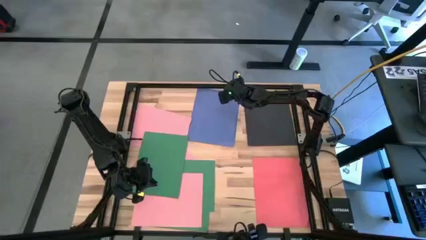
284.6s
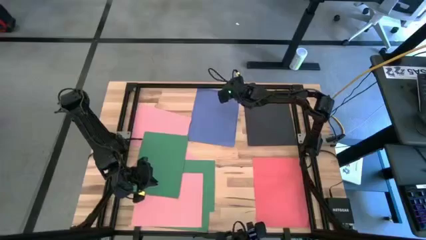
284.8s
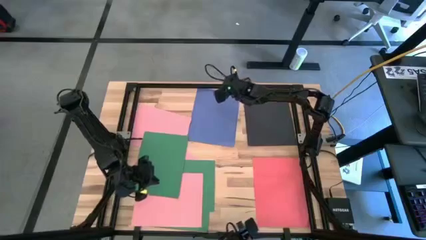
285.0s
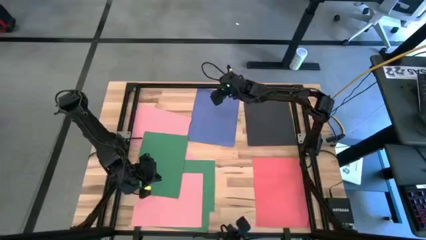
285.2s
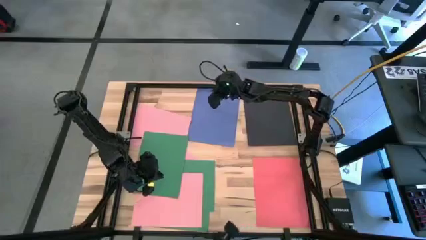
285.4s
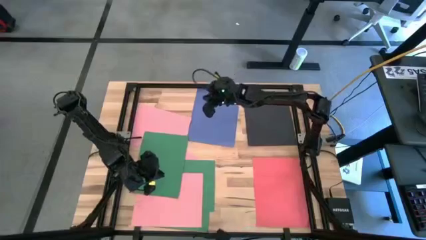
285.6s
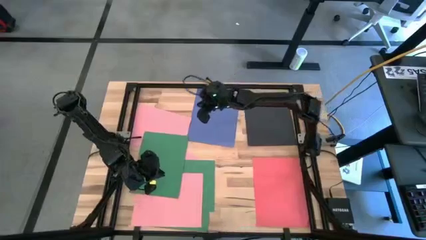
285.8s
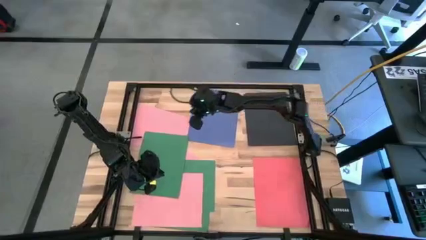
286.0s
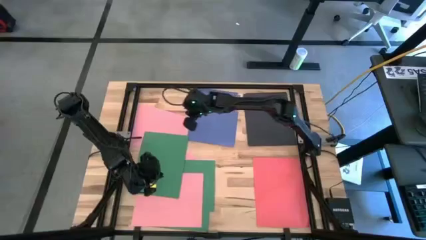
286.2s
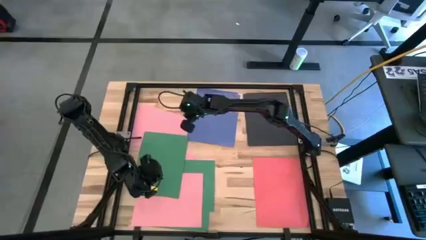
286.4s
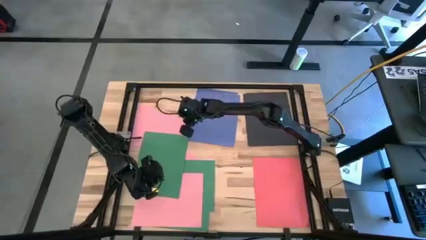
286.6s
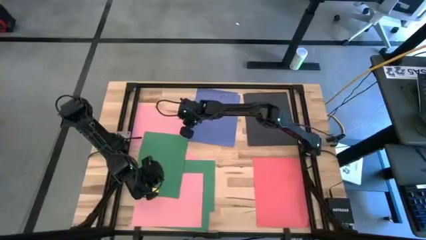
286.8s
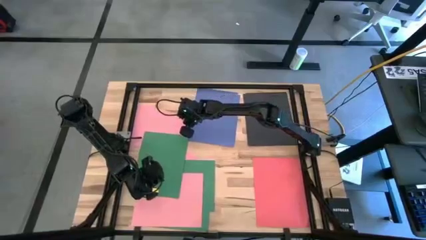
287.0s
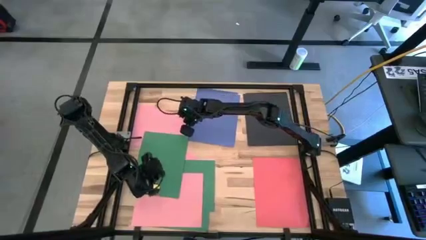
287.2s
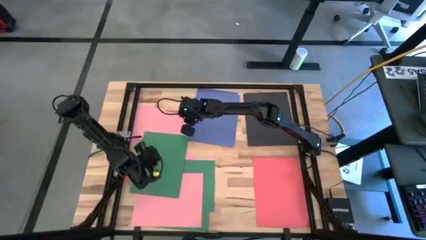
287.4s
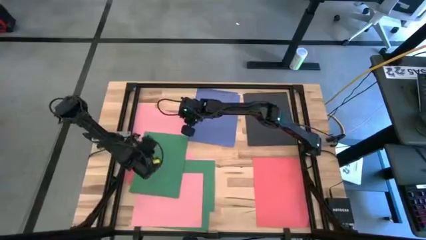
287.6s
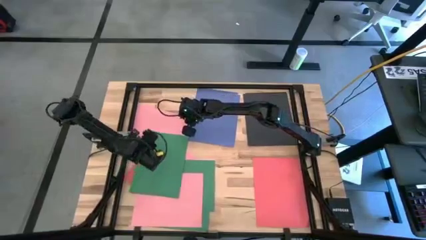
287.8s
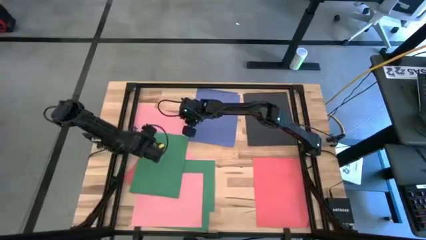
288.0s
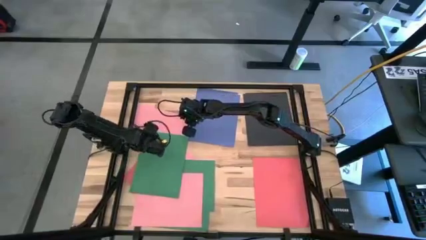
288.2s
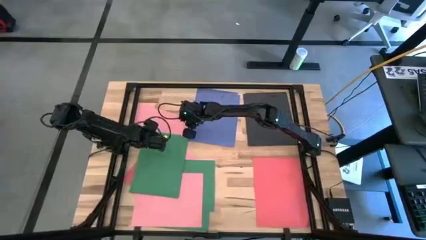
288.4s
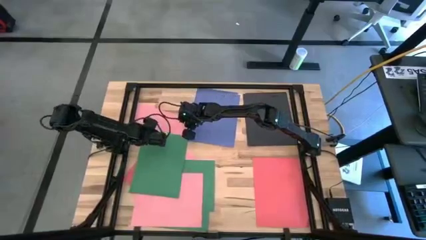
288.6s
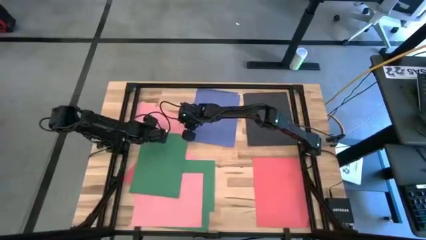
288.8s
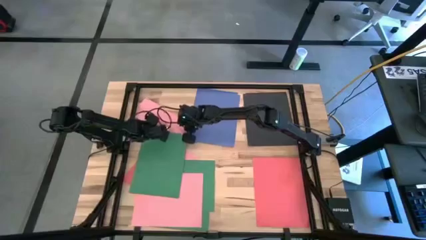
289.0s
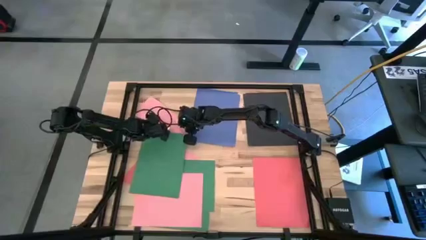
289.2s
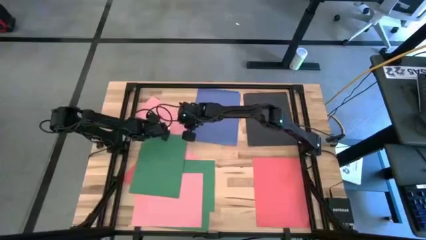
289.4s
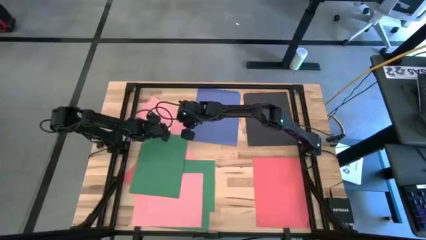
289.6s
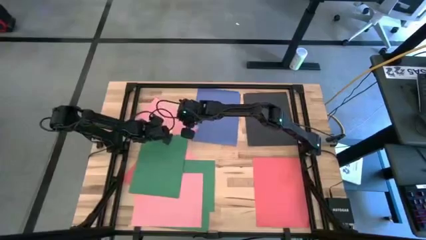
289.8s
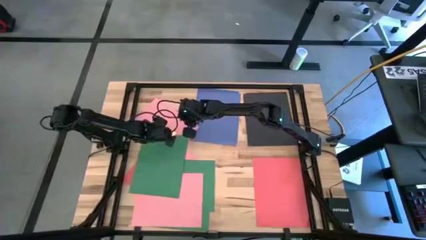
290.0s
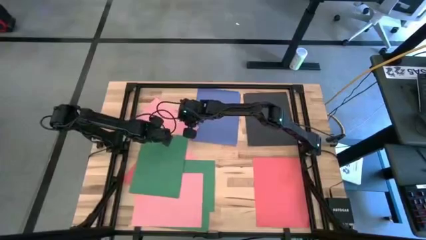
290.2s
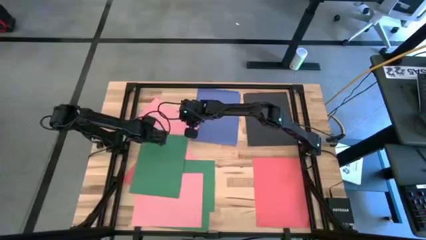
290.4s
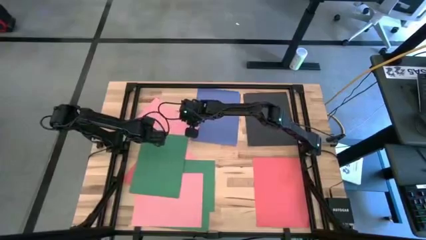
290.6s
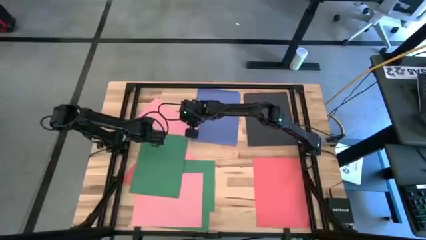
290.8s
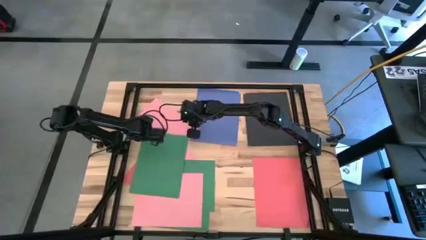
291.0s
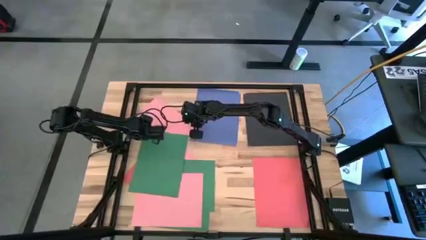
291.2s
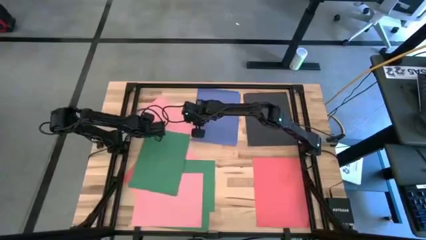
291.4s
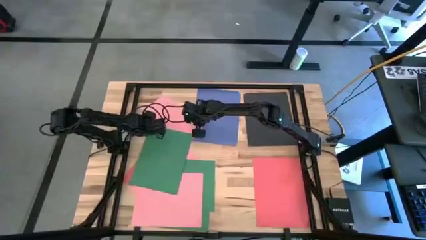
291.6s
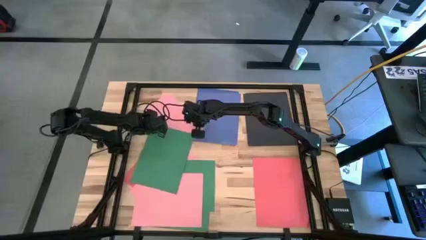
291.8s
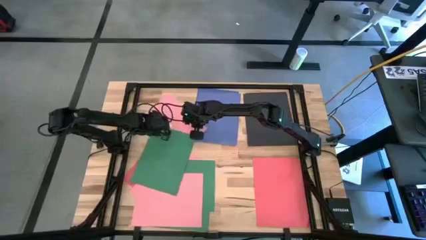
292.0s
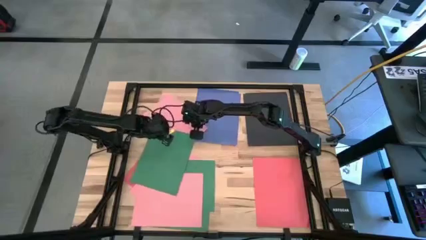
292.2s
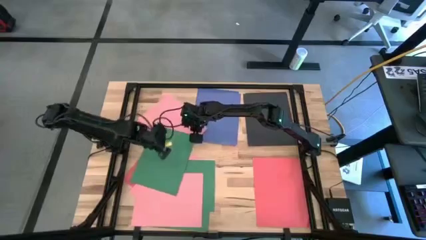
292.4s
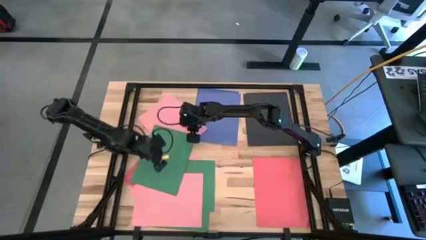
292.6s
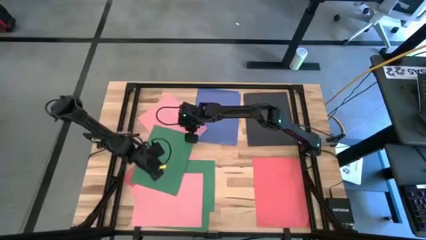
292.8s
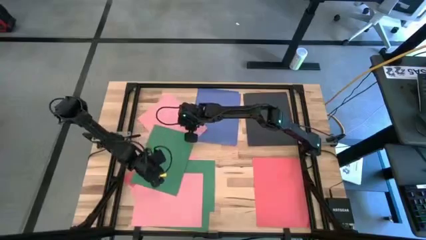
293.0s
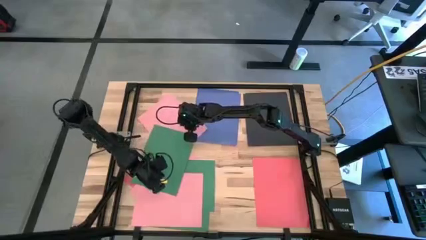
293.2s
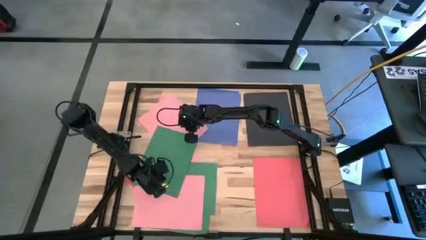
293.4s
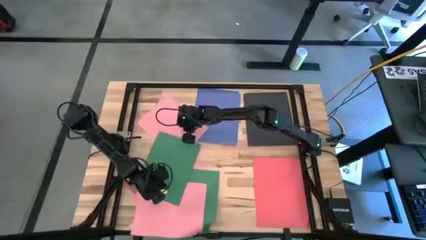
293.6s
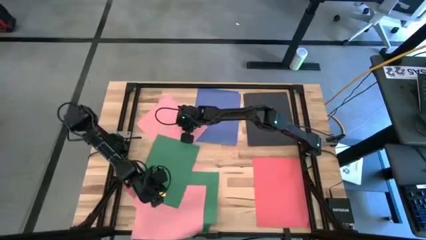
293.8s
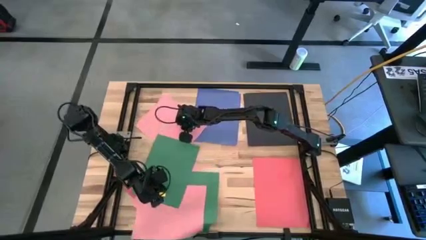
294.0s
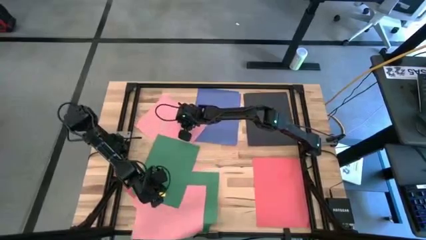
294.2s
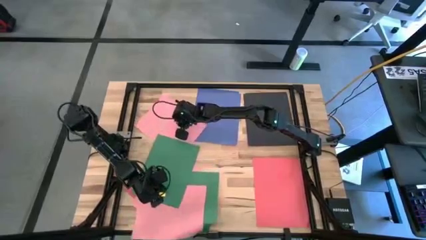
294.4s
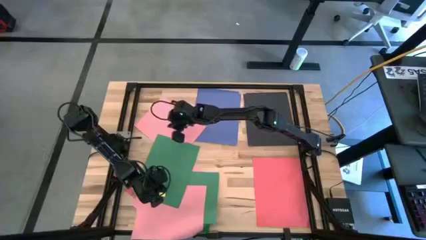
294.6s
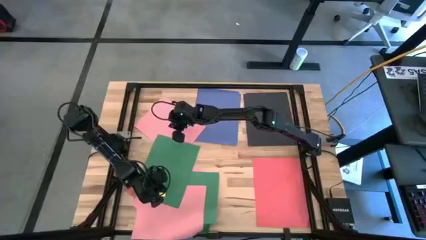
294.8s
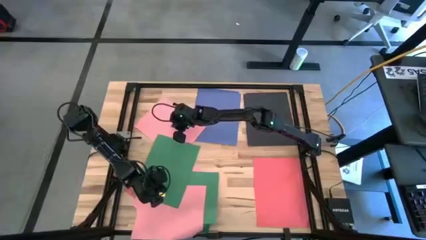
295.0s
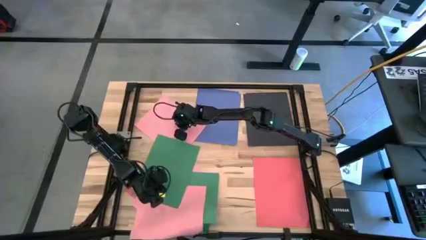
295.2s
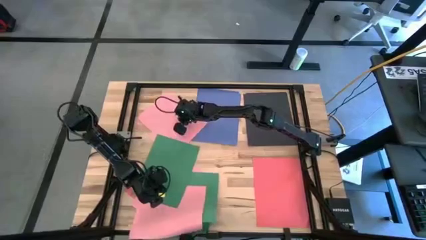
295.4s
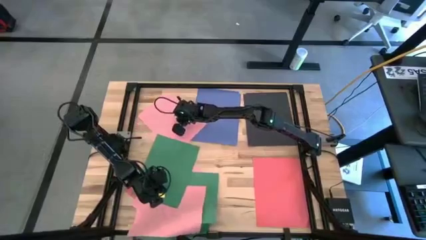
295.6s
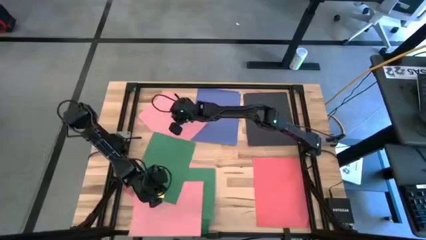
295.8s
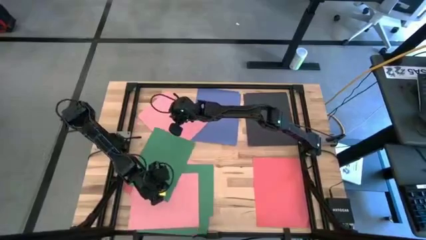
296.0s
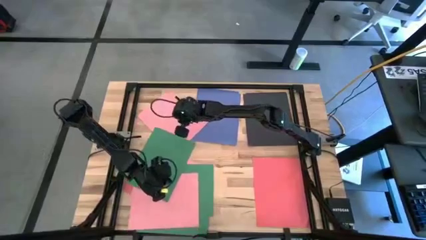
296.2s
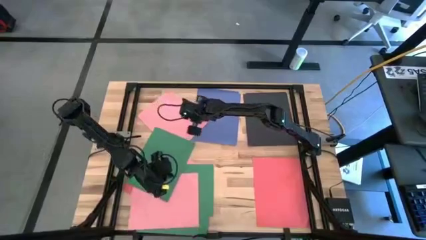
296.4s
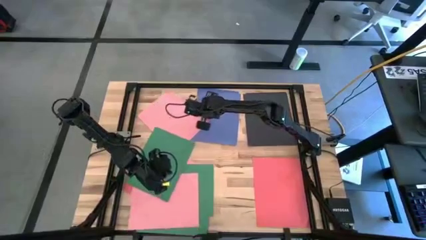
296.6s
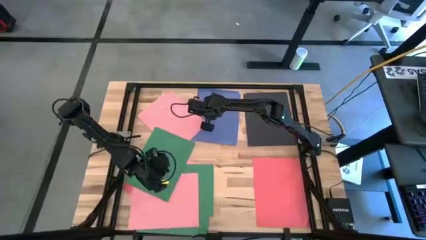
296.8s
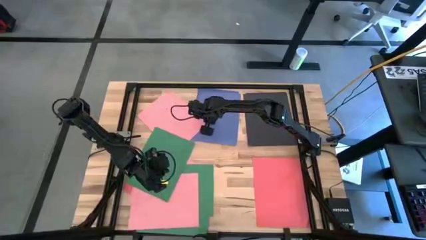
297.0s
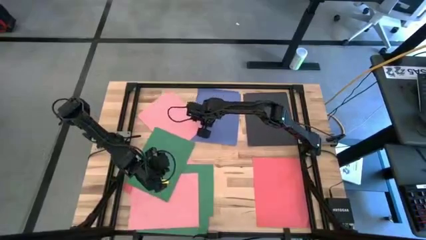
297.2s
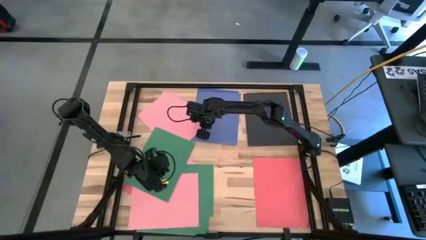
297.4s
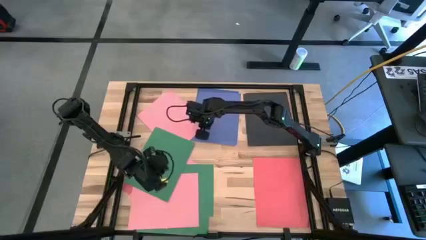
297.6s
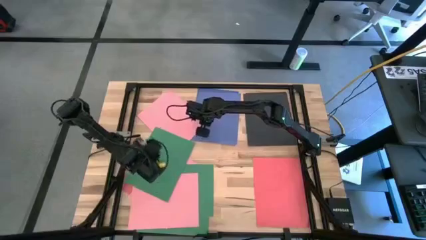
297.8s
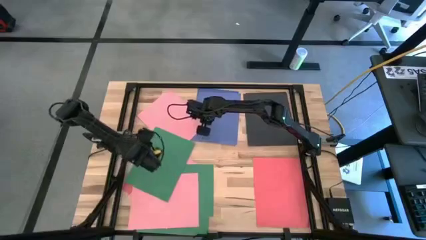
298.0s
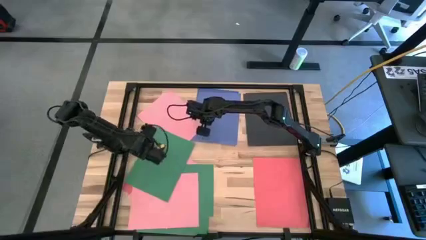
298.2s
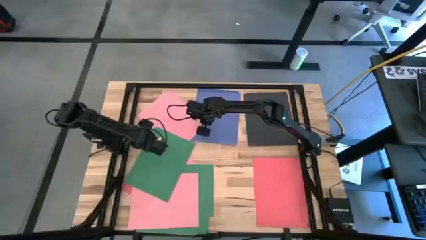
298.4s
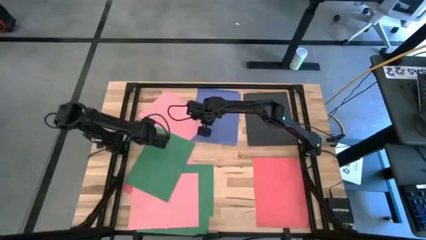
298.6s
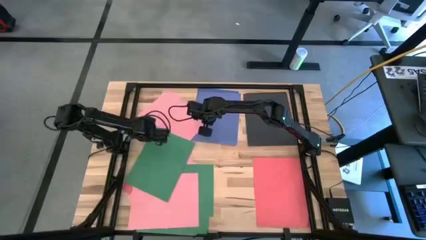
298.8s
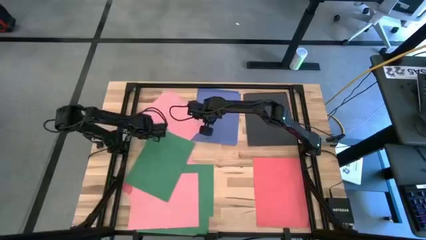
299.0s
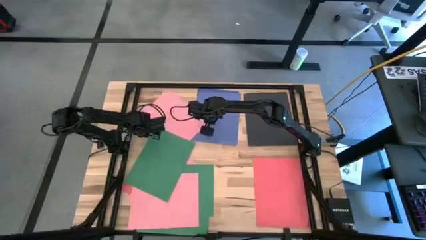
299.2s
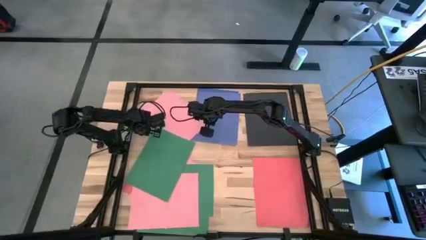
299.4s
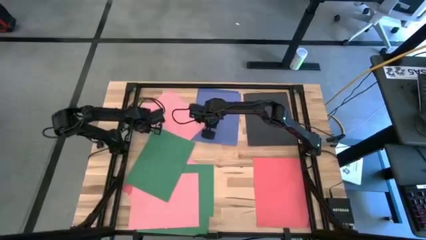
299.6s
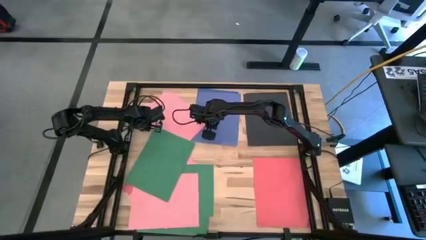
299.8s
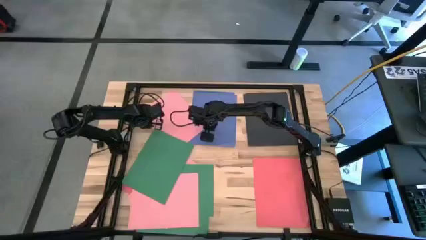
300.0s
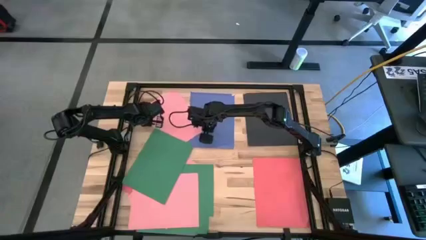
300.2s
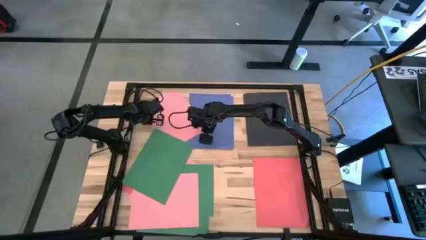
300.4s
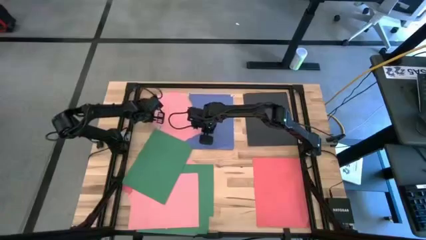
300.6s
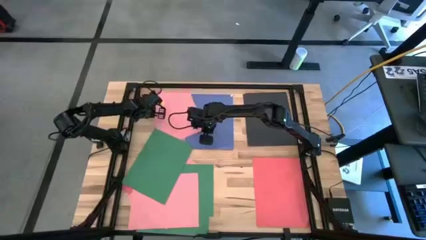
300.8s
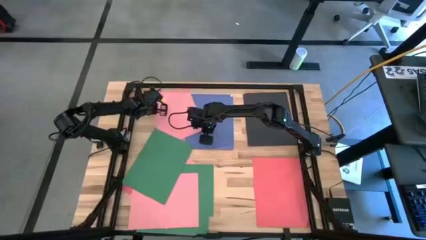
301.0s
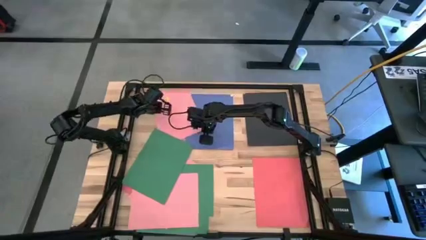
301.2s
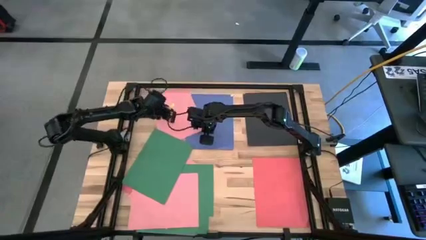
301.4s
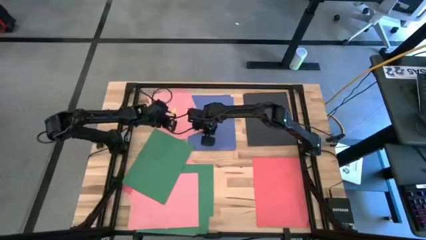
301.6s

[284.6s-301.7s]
Task: Organize paper
Move the pink paper to the top left of the table
